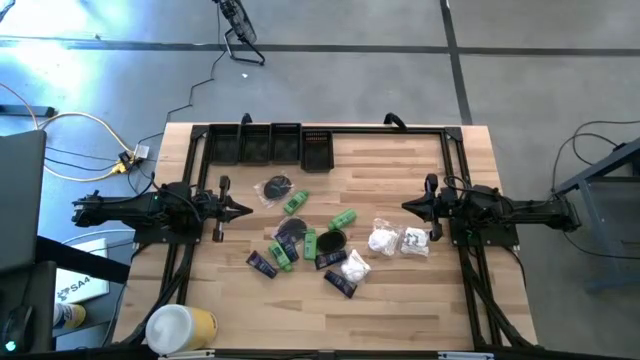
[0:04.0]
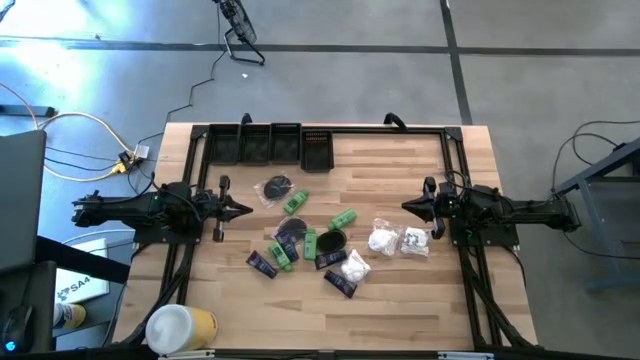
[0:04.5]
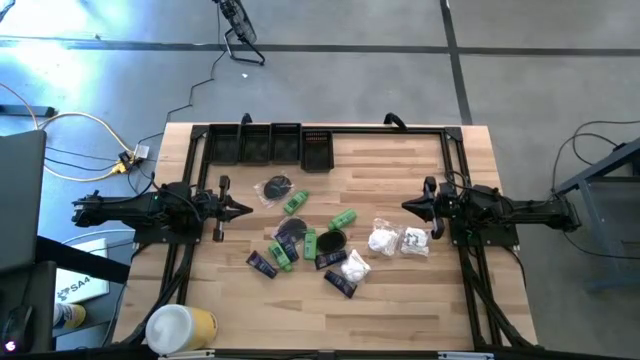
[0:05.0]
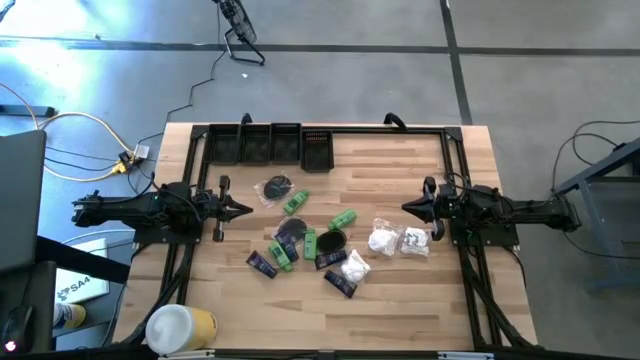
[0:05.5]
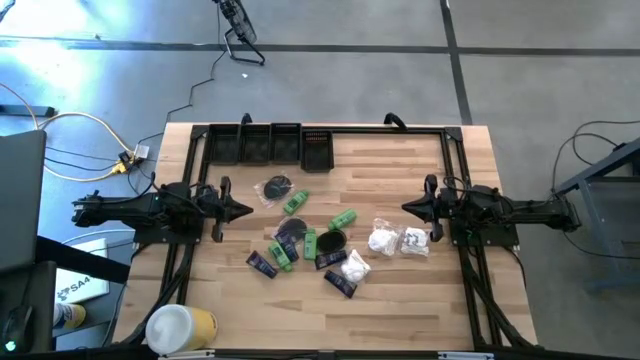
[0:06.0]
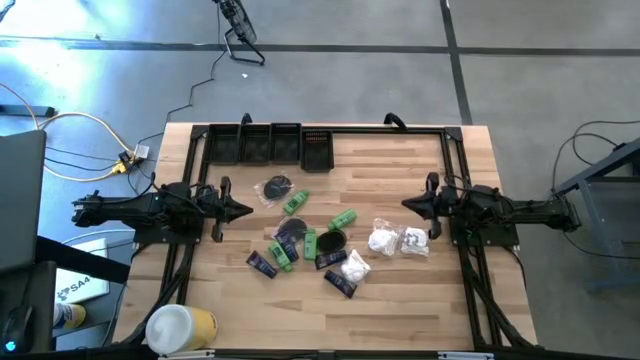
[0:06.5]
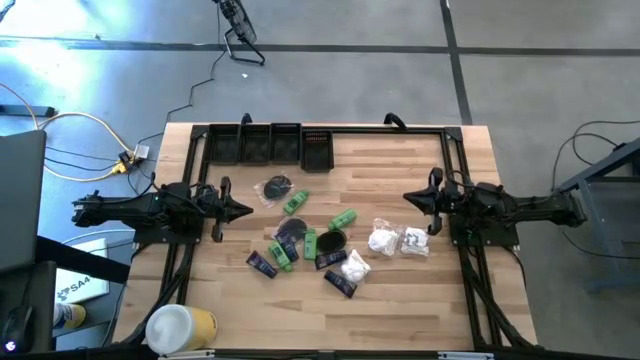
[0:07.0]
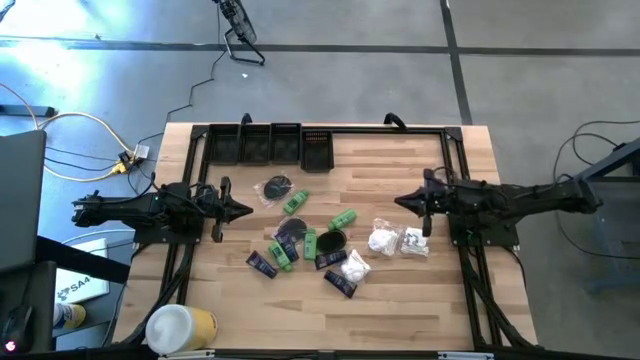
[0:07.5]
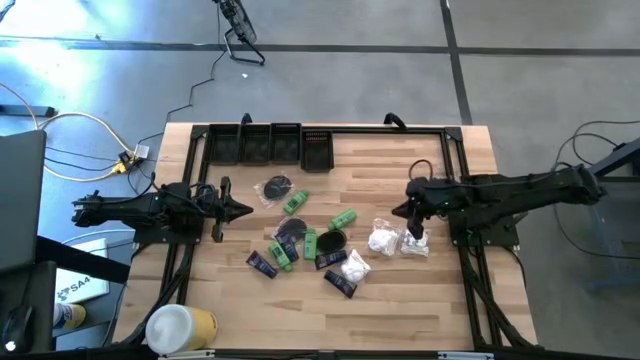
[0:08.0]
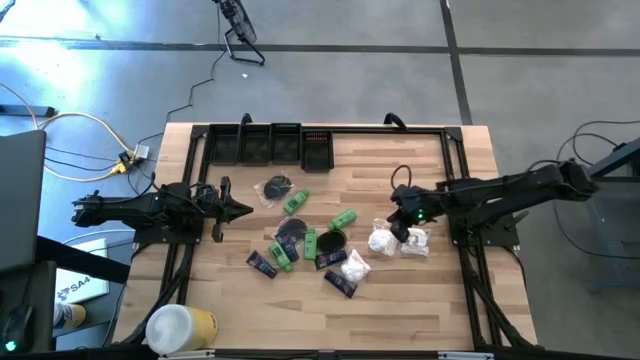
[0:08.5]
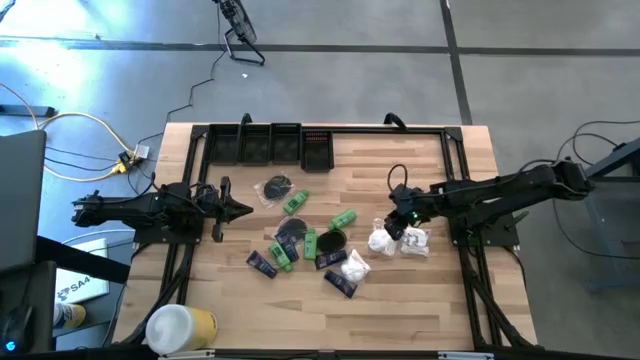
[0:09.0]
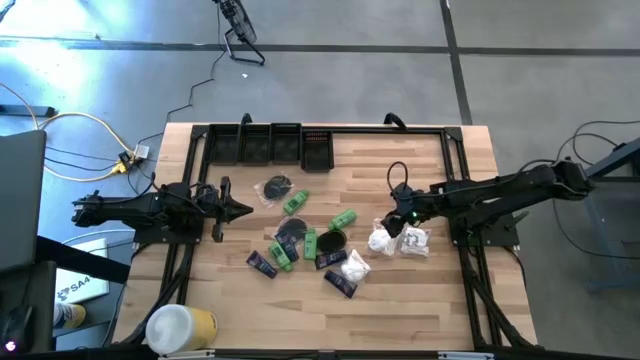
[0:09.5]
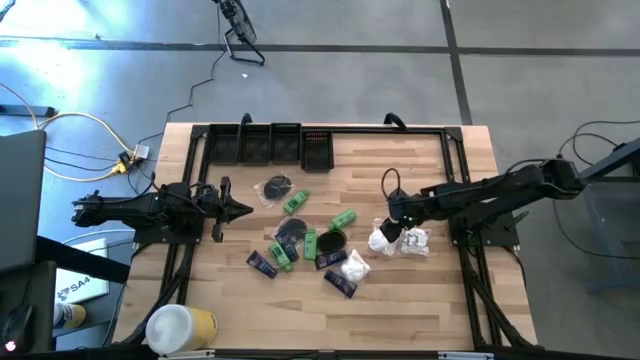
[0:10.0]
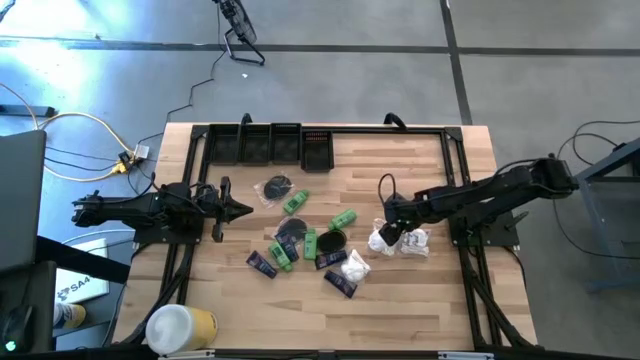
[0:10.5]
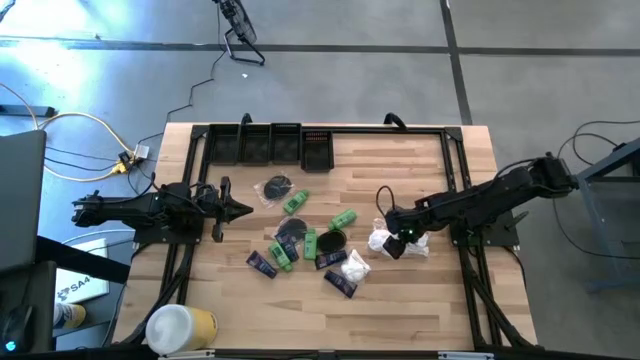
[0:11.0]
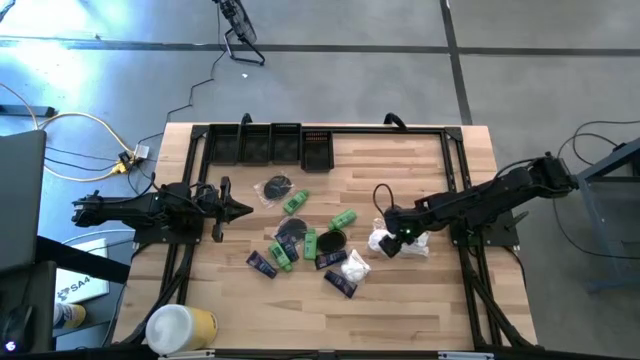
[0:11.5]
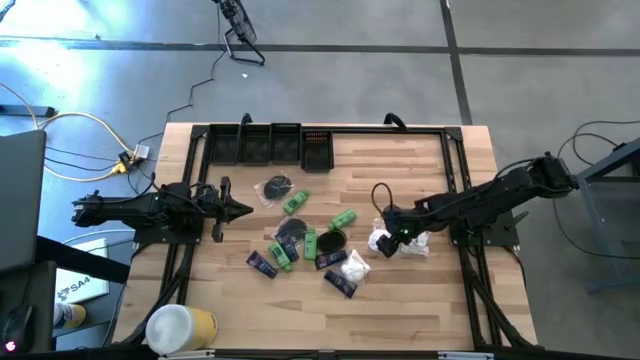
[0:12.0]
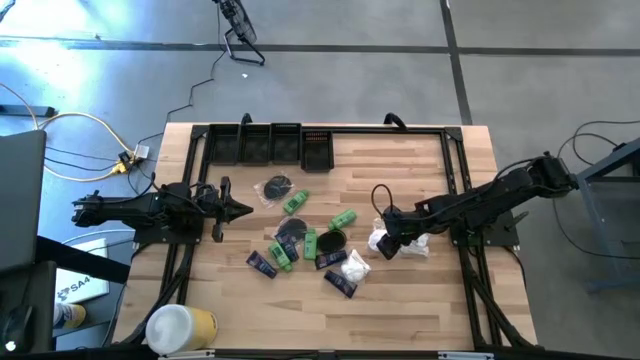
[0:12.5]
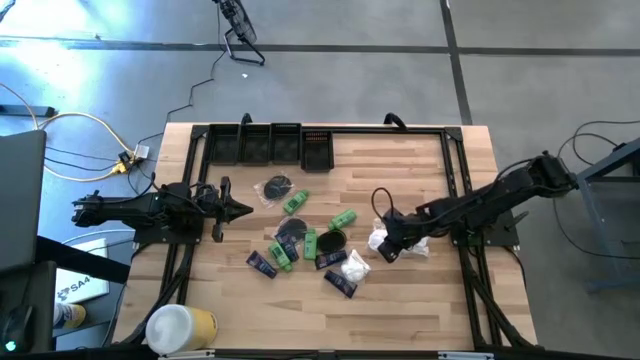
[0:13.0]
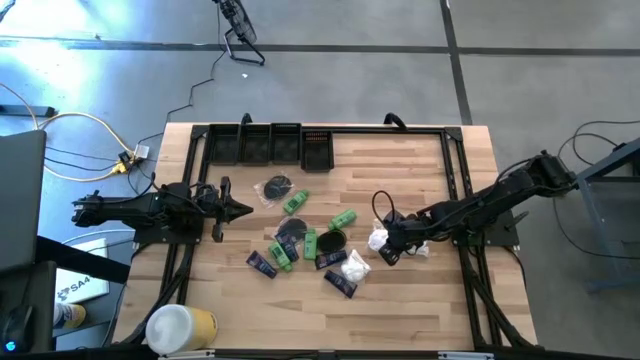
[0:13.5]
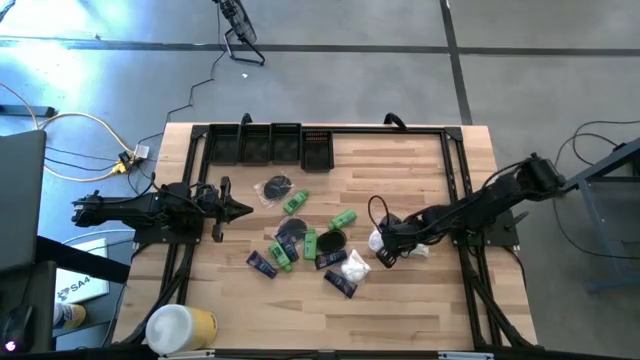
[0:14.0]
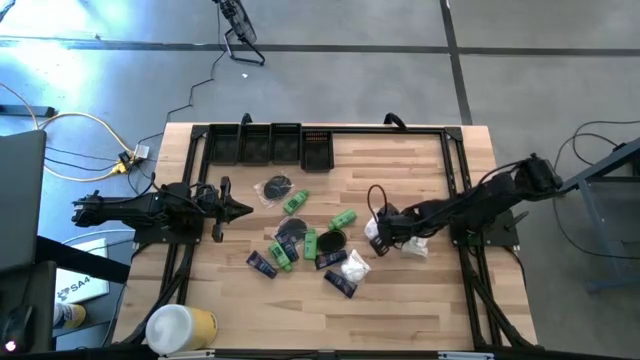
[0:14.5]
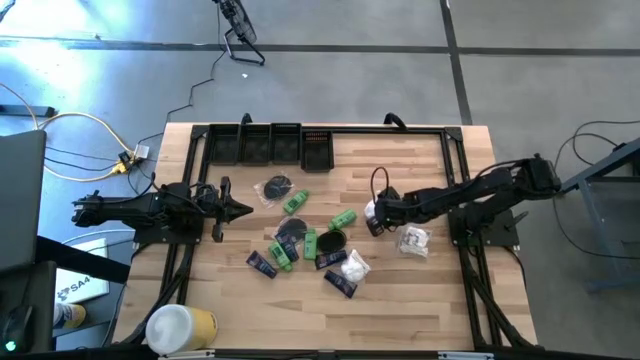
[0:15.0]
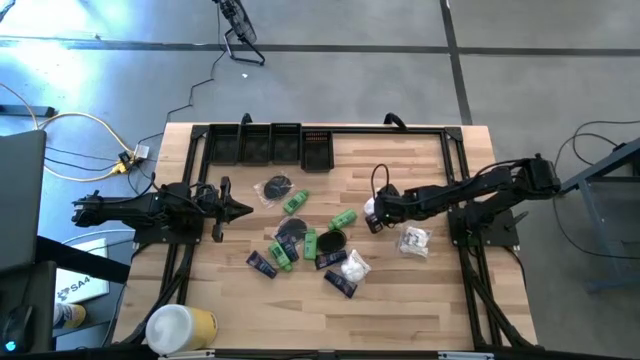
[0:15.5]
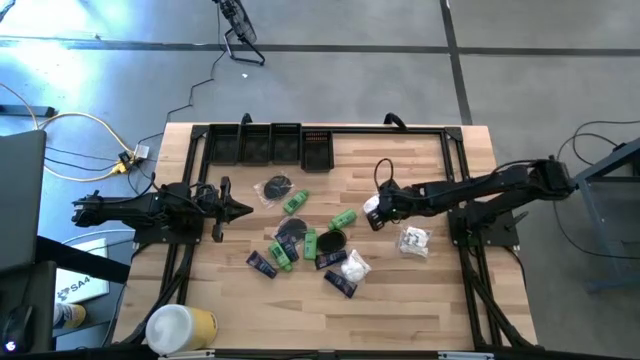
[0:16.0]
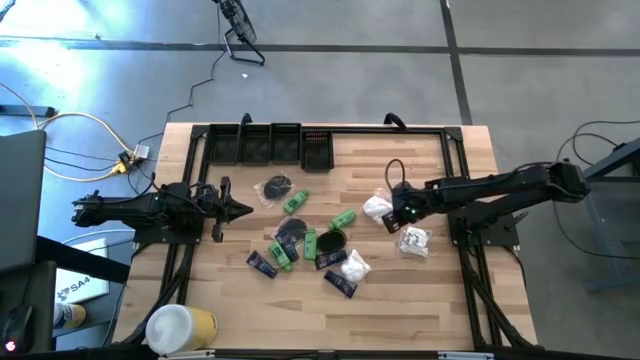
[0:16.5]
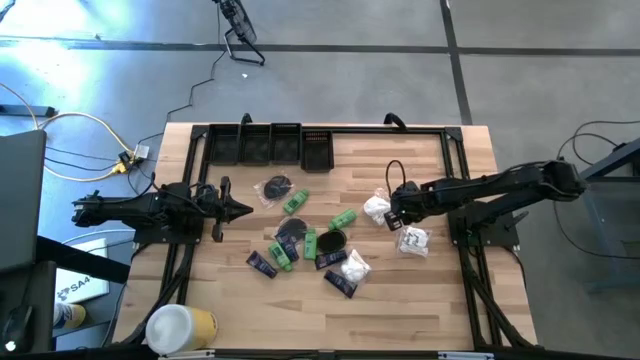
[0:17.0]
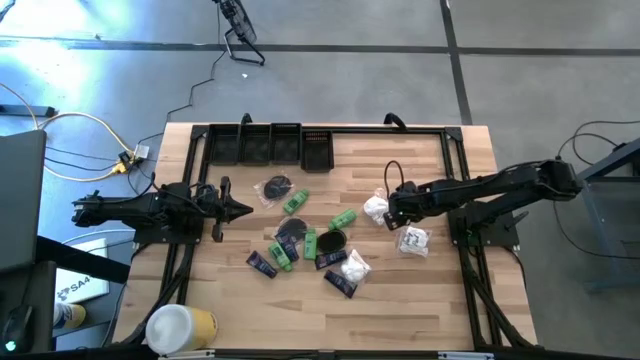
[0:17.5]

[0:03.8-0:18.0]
Task: Pick & Place Travel size toiletries
Put the cotton pack into the left black bin

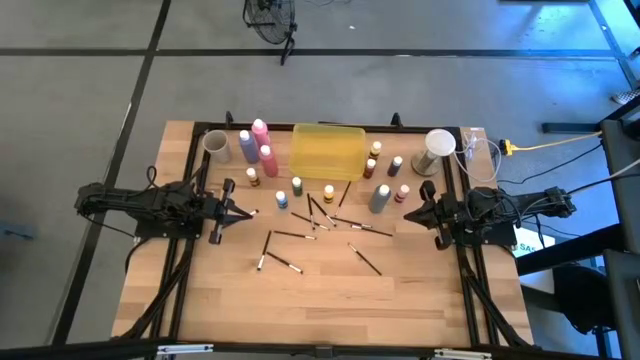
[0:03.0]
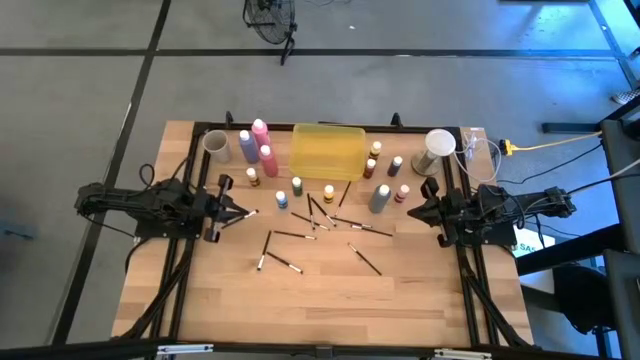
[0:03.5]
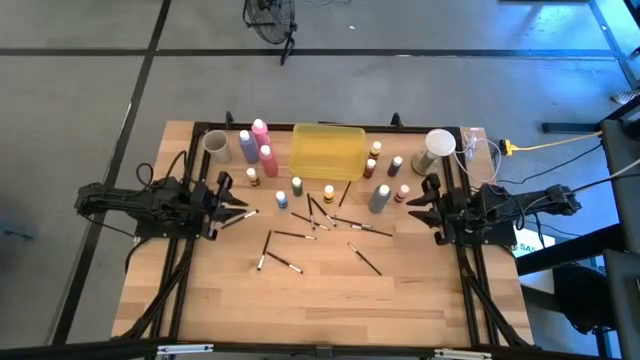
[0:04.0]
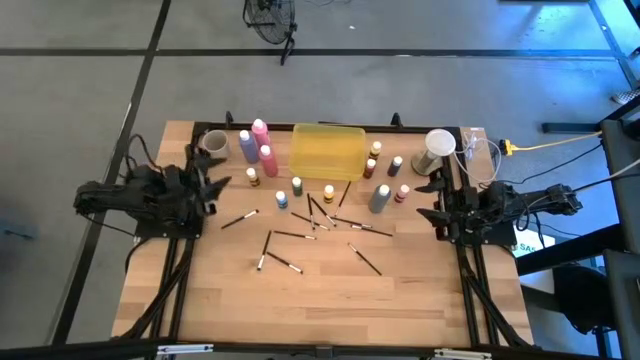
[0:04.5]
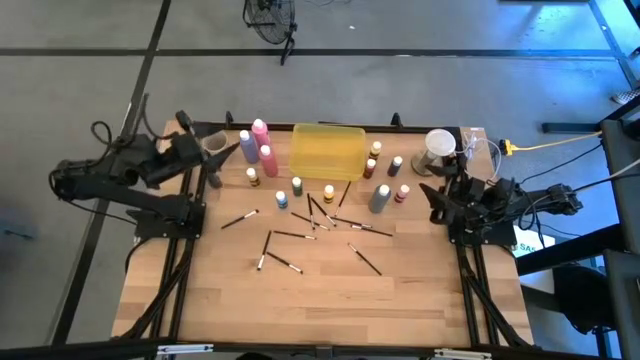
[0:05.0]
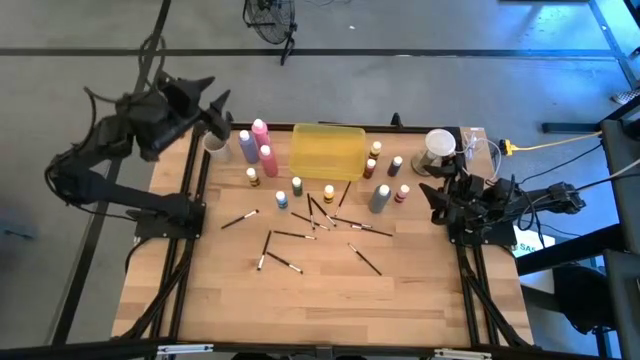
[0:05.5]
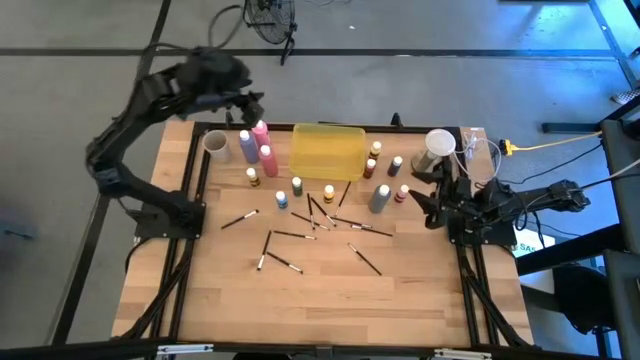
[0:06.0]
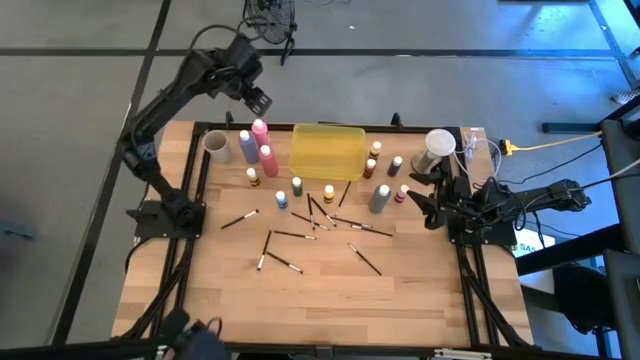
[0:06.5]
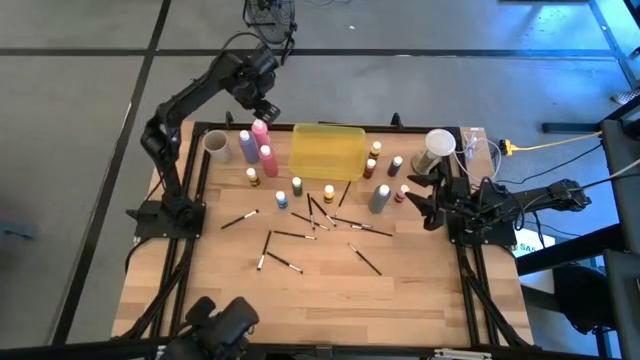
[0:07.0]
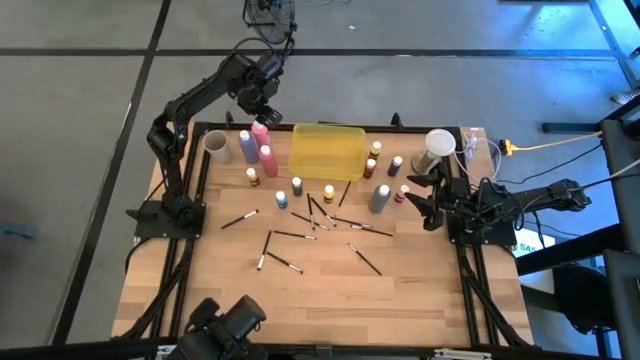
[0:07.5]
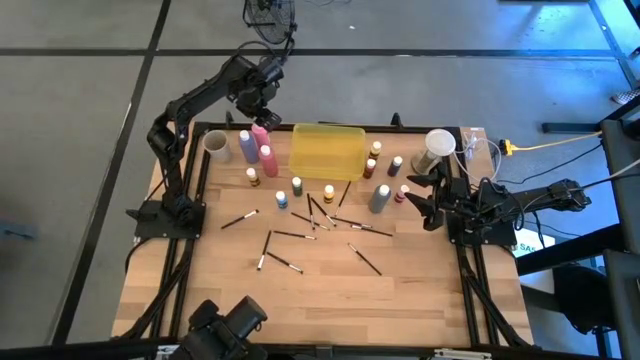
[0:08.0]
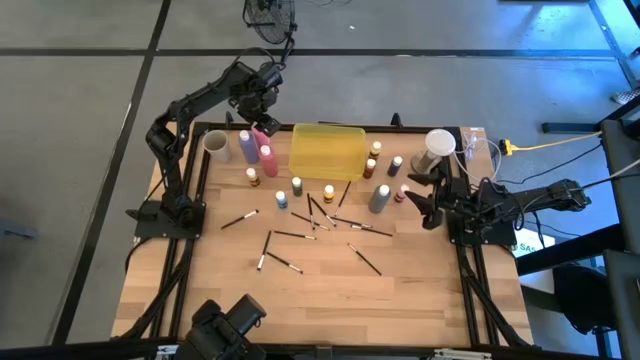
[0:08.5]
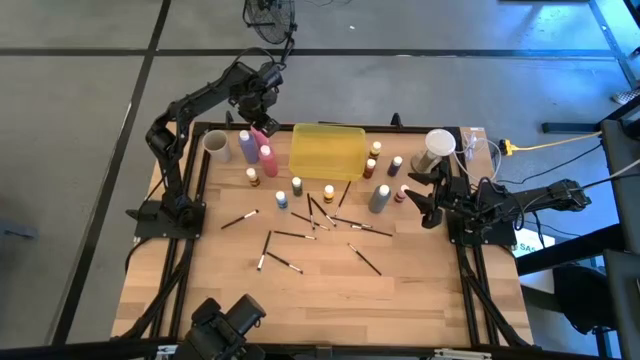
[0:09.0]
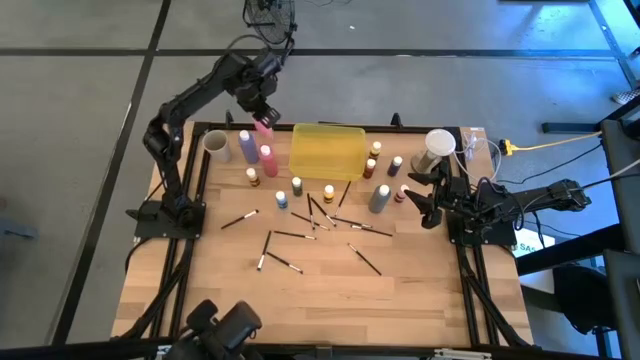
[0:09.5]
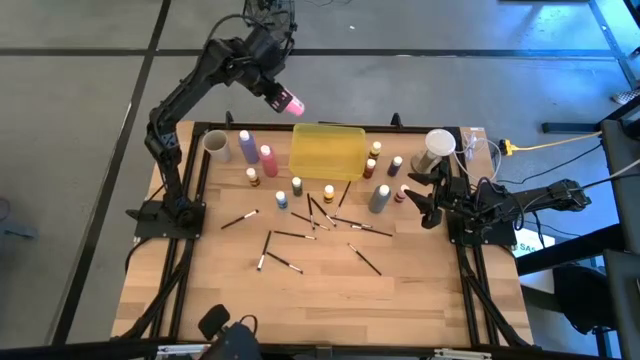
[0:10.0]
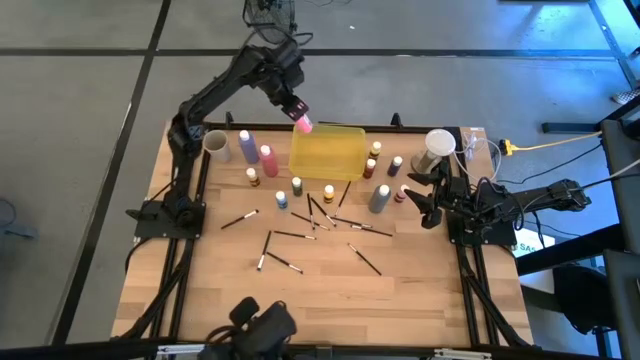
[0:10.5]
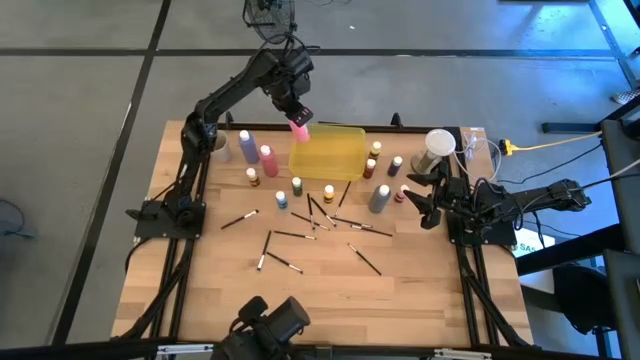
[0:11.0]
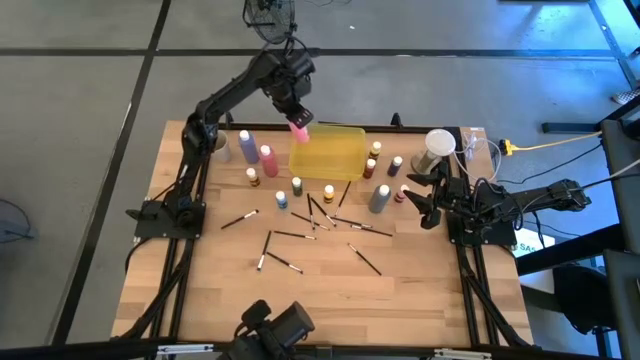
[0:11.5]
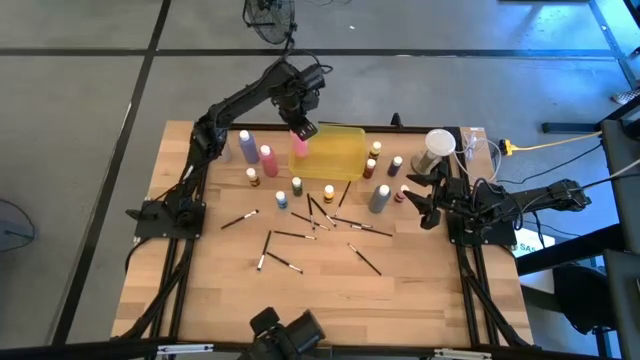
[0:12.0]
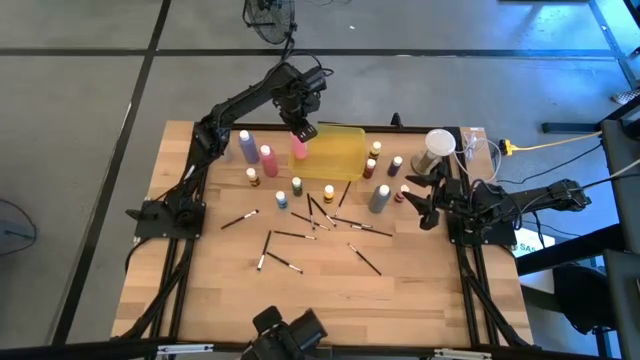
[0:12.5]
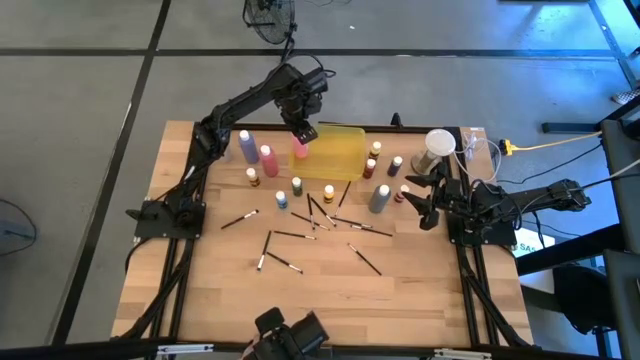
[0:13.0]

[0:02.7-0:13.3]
Task: Pick & Place Paint Supplies
Put the large pink paint bottle into the yellow bin
